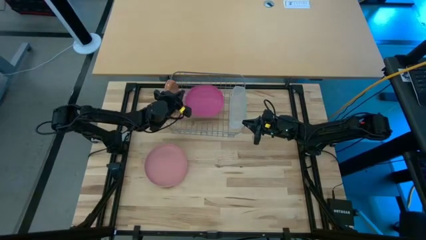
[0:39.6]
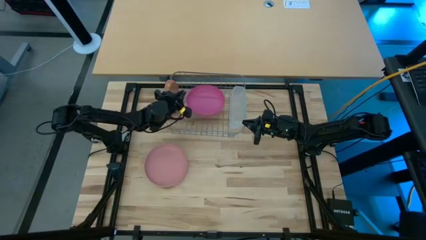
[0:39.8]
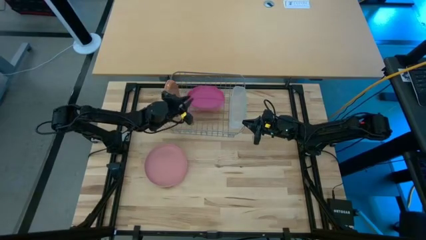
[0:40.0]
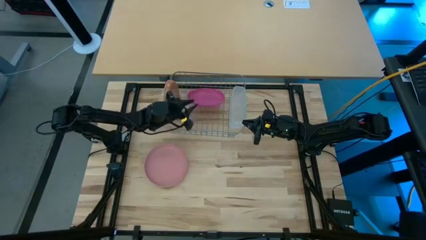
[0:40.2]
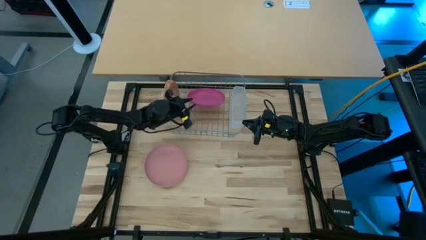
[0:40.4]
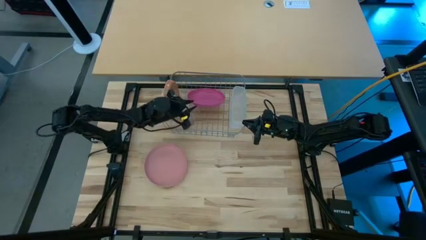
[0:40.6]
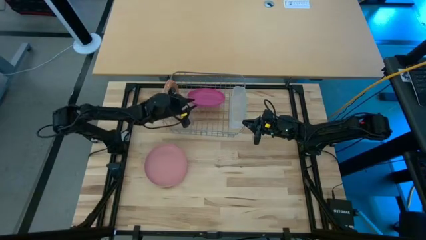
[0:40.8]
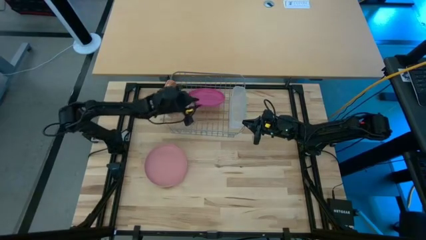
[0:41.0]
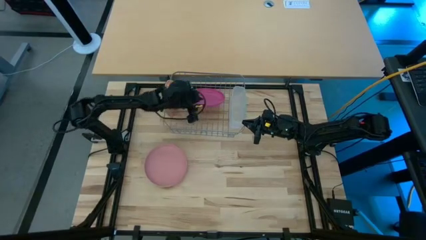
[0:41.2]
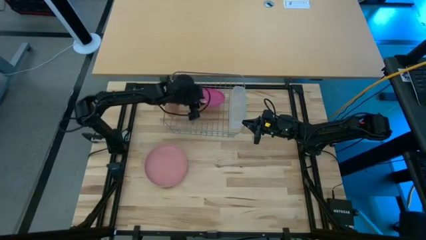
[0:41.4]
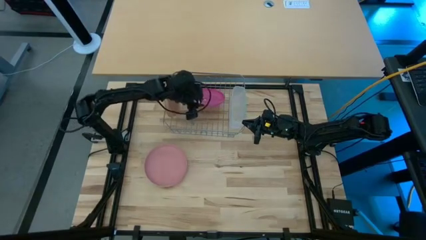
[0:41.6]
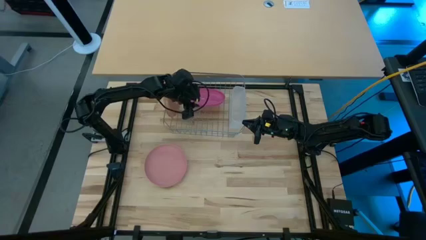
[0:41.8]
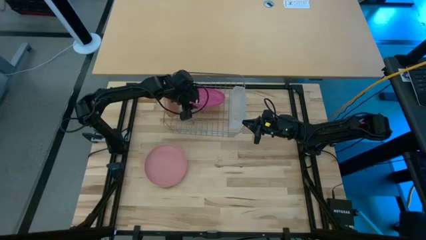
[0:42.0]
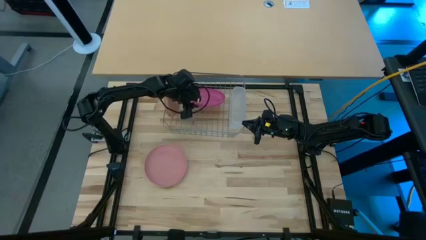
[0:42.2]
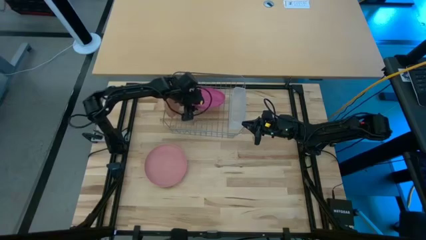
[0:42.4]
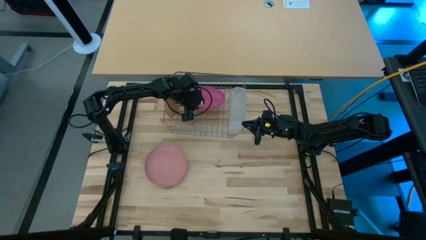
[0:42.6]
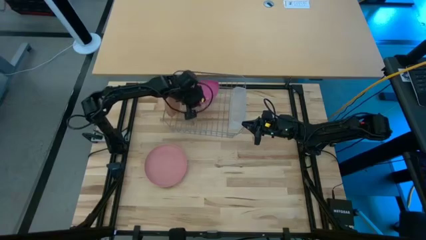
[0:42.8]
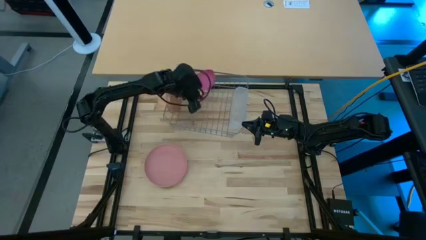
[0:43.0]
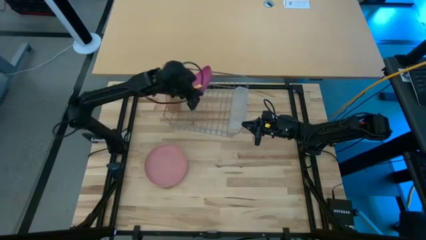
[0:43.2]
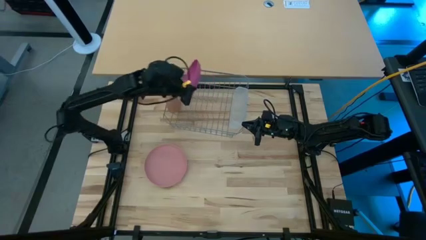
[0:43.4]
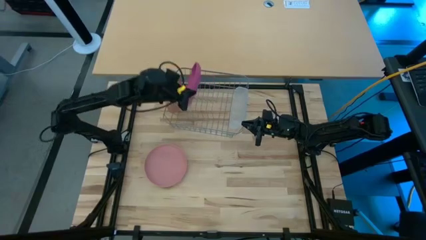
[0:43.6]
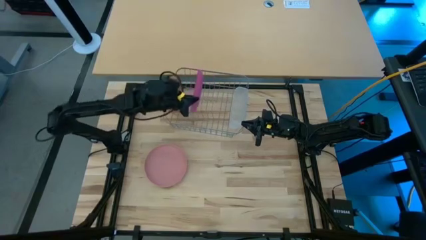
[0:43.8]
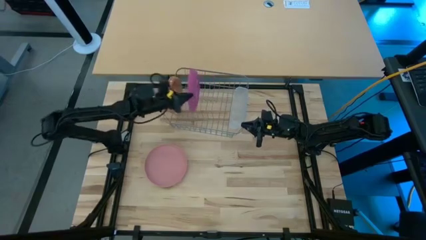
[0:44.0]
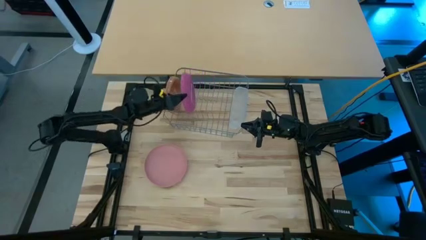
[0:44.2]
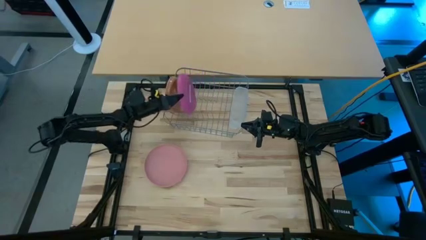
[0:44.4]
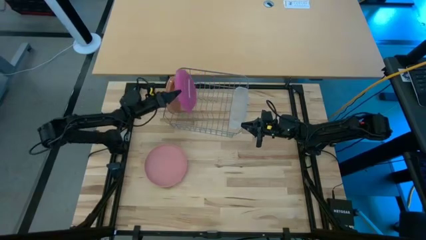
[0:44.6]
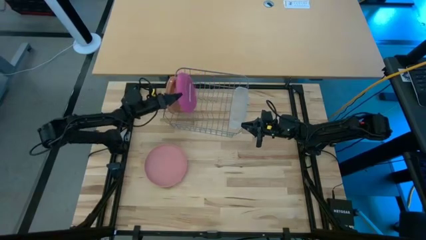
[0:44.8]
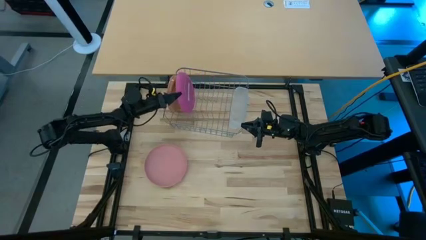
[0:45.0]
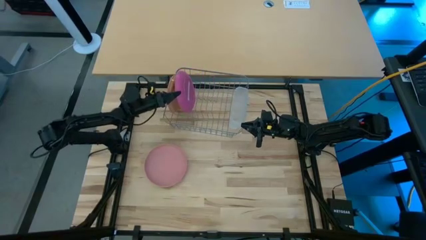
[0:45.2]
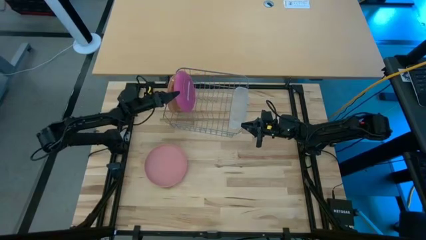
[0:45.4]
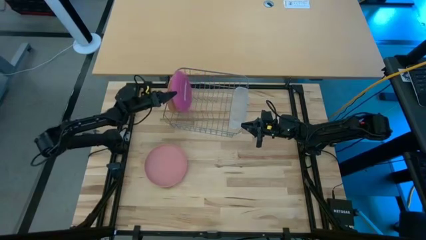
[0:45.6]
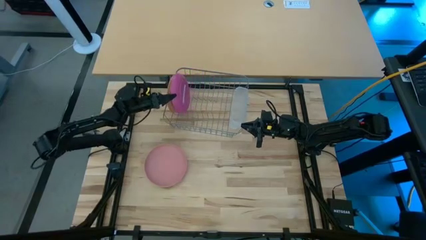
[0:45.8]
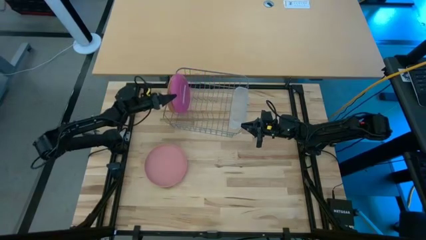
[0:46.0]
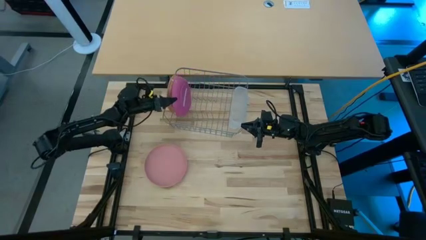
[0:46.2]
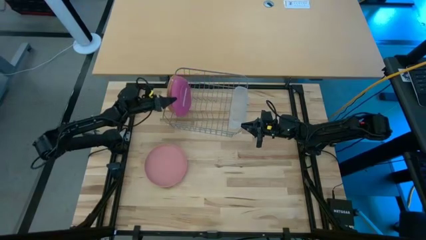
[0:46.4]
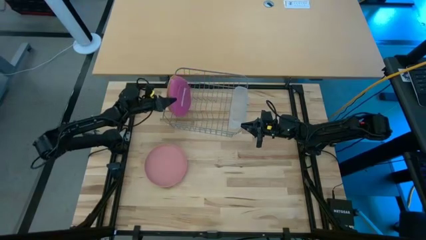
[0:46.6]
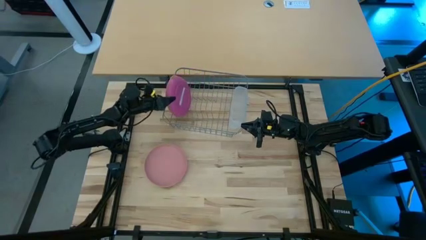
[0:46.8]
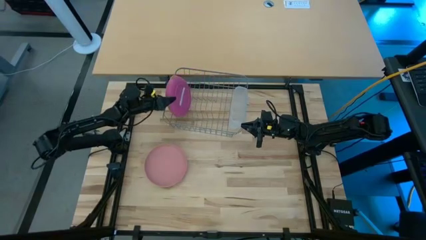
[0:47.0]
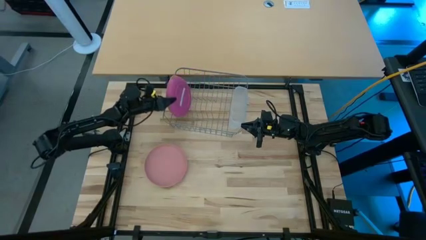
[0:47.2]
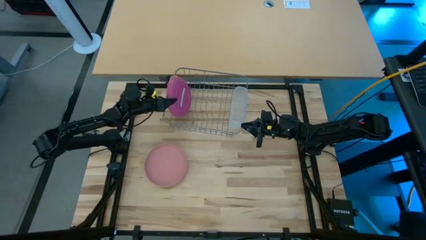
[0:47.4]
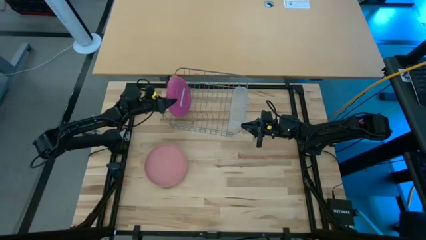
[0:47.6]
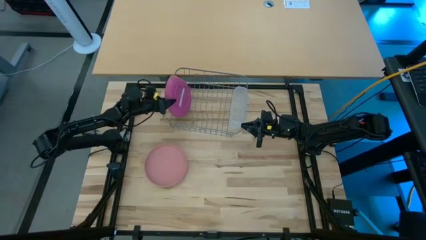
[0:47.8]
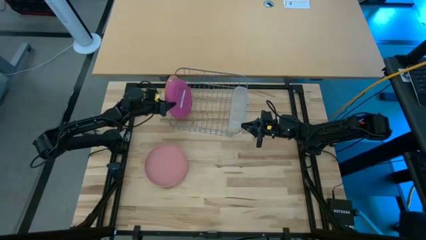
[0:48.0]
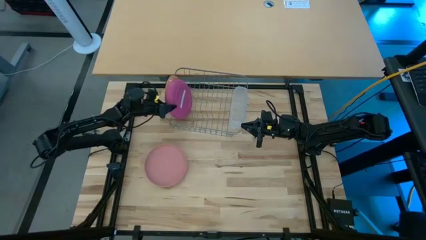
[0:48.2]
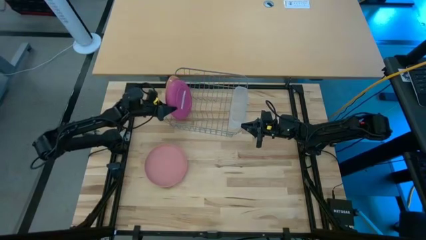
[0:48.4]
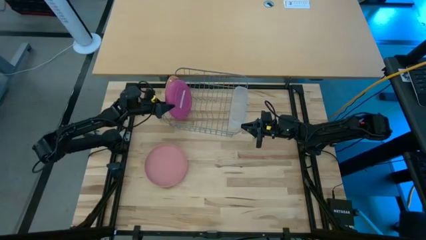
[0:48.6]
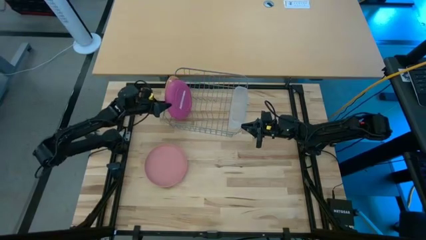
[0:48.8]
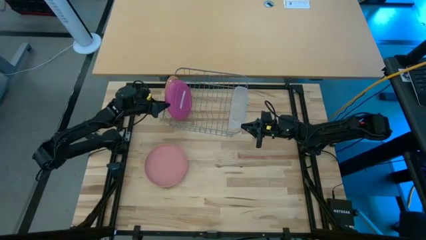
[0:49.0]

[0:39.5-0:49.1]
Task: Sort dishes
Put the dark pink plate into the dish rack

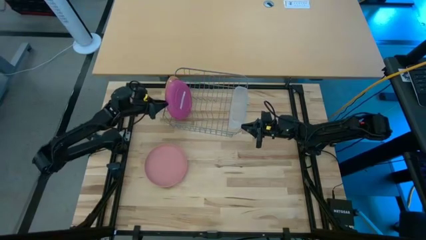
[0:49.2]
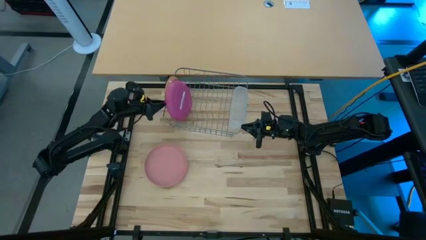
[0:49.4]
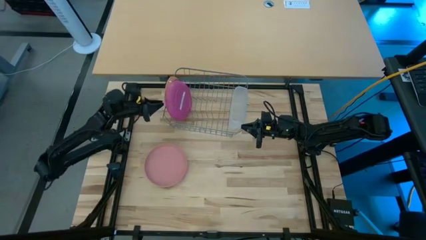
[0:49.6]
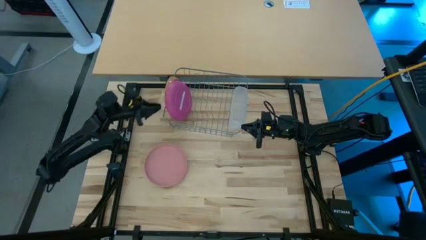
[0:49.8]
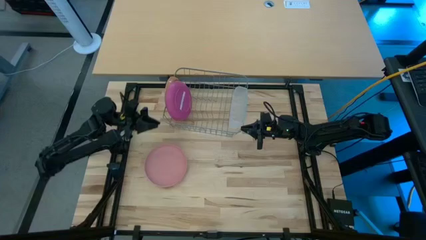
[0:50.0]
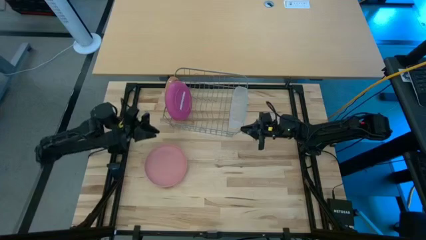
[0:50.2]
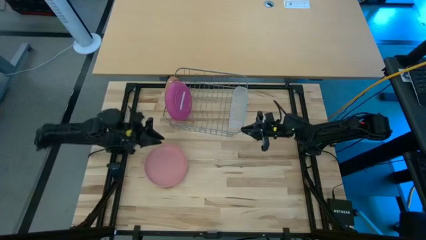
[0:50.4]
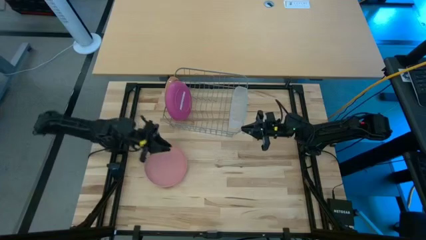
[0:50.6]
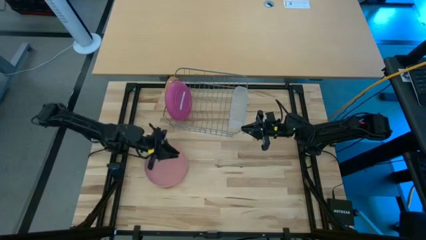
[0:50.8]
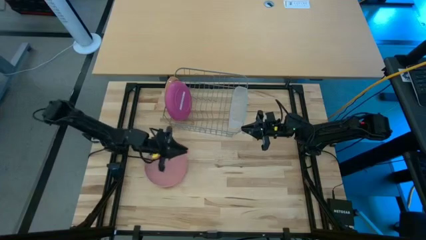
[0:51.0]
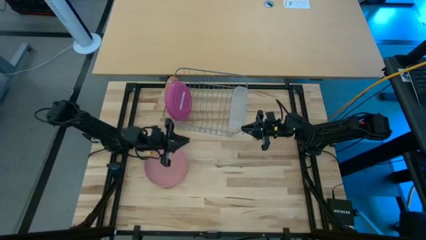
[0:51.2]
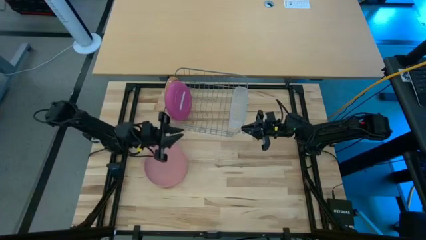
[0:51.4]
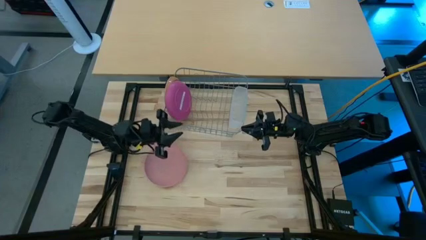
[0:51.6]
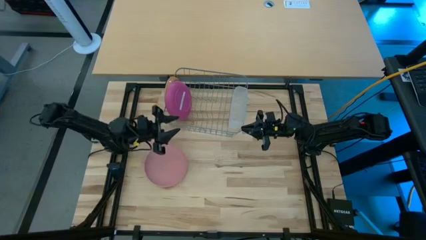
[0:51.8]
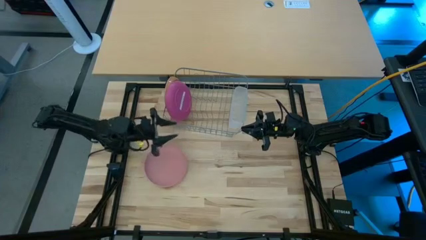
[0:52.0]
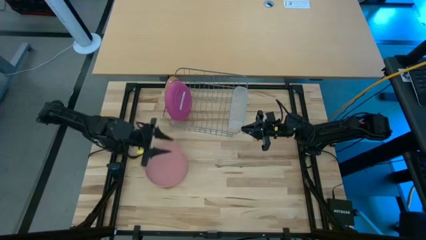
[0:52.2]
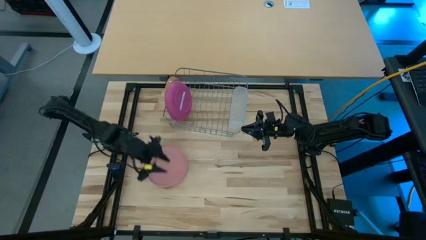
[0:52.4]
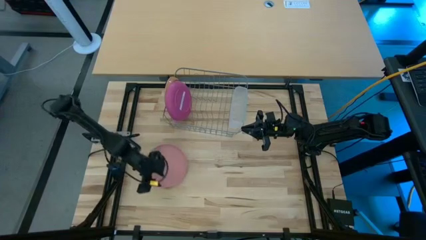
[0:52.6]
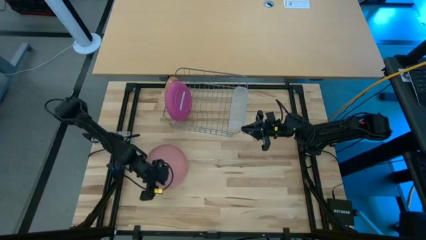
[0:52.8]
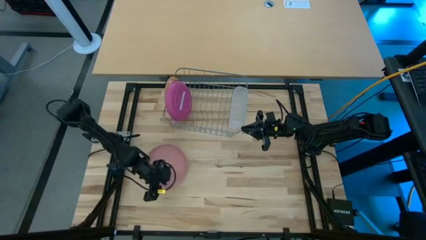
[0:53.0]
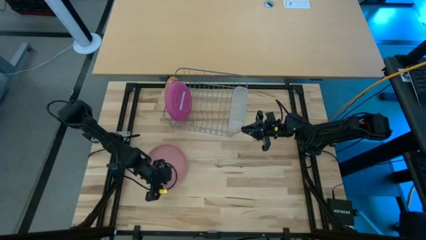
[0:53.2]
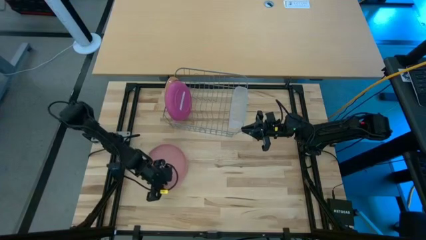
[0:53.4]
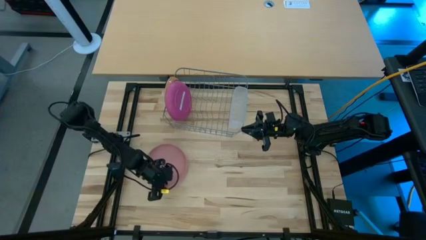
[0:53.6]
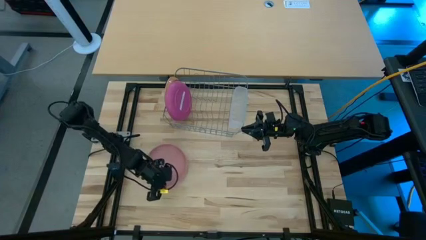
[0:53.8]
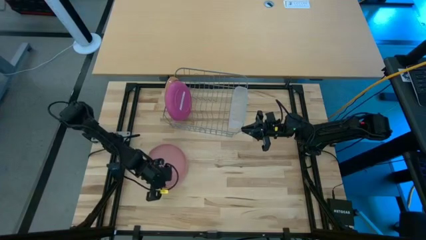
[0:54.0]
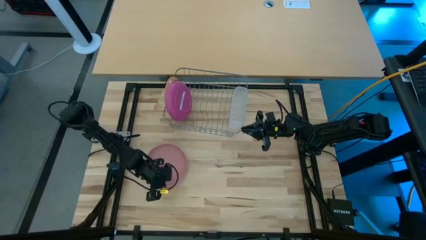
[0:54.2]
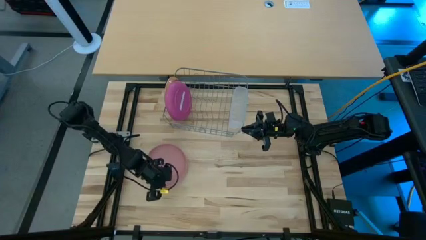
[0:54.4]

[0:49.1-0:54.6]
Put the pink plate into the dish rack
